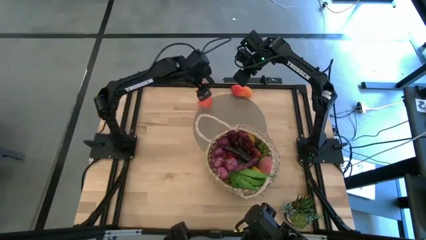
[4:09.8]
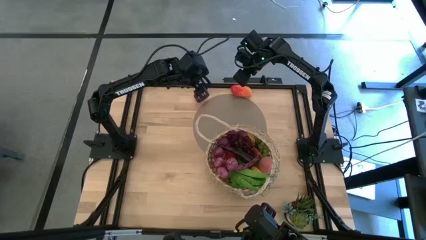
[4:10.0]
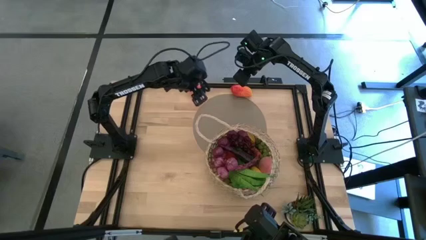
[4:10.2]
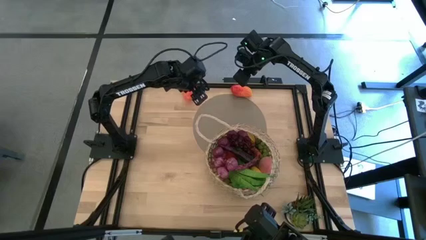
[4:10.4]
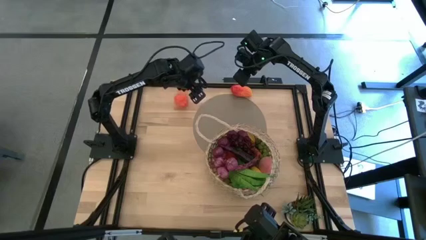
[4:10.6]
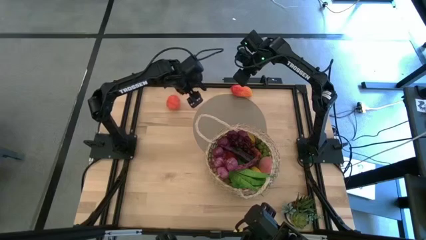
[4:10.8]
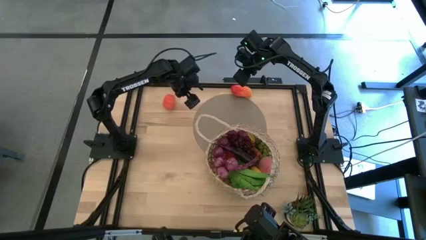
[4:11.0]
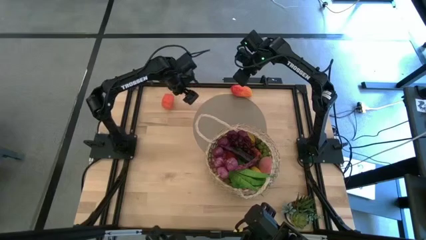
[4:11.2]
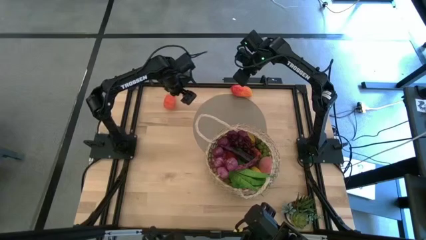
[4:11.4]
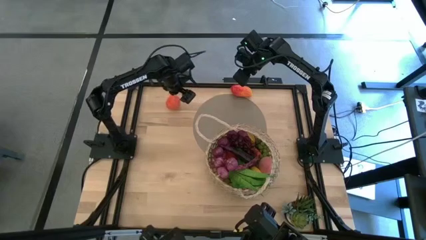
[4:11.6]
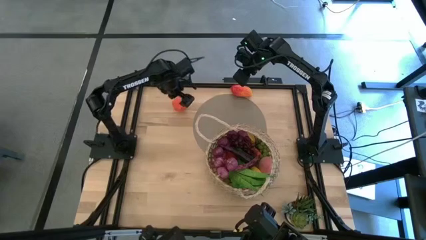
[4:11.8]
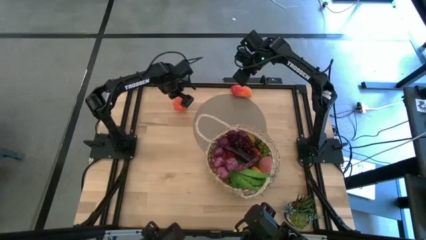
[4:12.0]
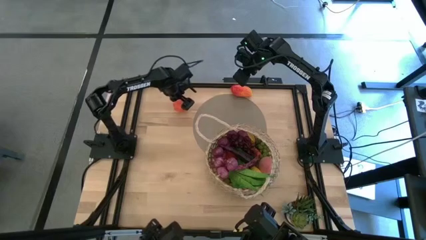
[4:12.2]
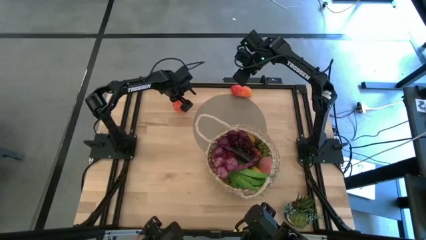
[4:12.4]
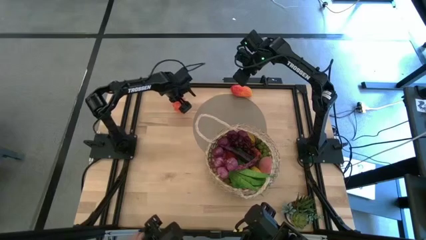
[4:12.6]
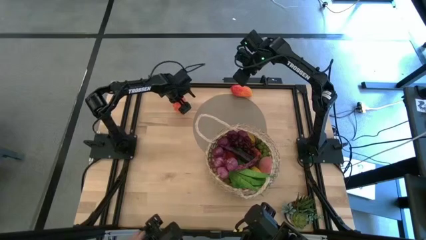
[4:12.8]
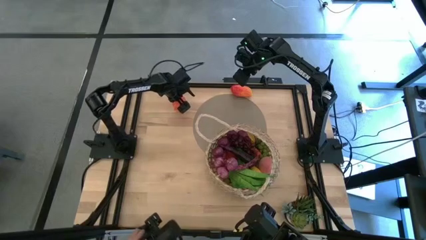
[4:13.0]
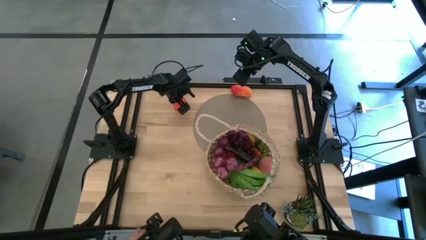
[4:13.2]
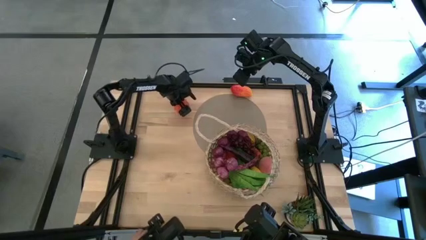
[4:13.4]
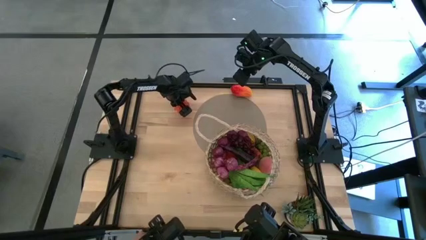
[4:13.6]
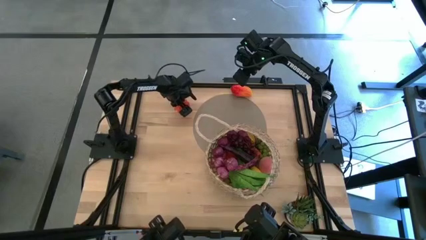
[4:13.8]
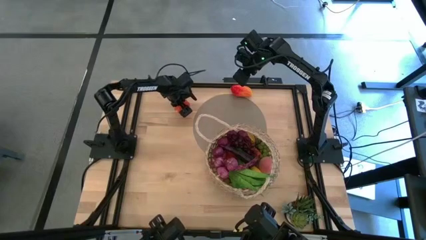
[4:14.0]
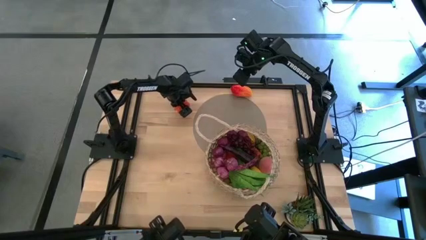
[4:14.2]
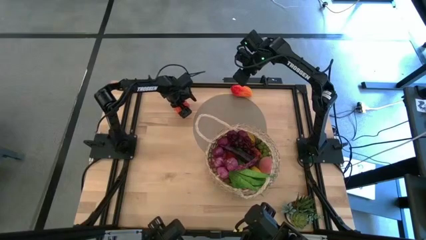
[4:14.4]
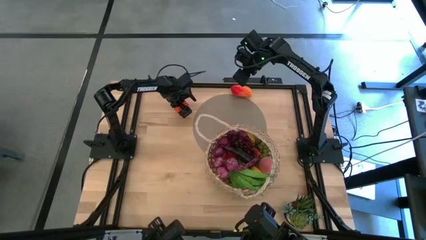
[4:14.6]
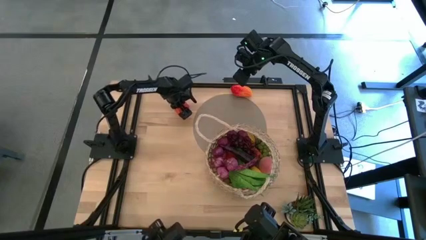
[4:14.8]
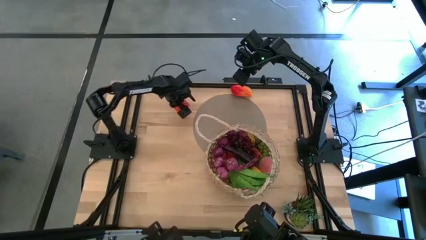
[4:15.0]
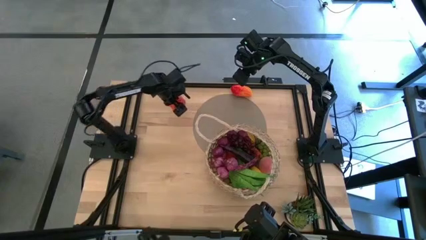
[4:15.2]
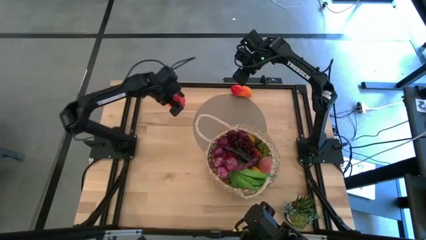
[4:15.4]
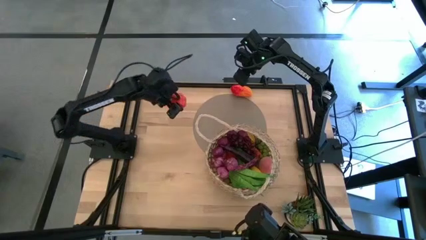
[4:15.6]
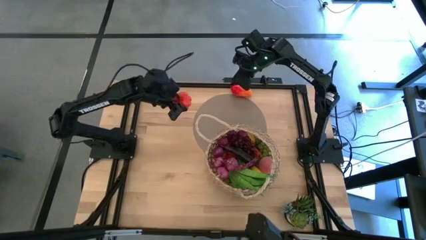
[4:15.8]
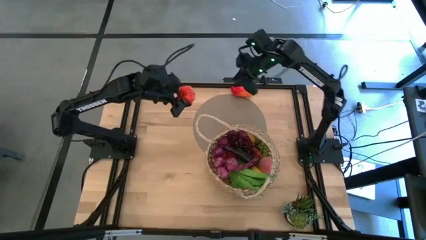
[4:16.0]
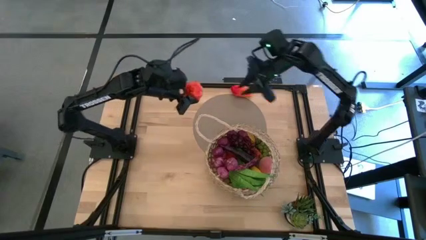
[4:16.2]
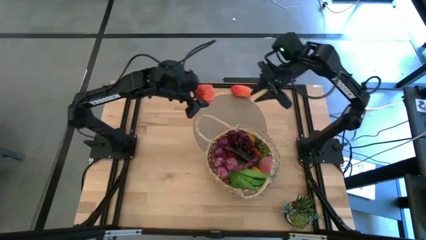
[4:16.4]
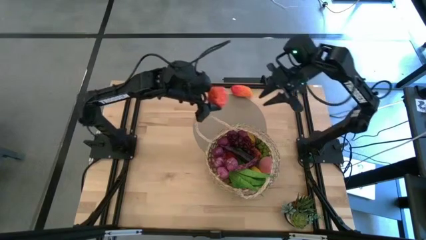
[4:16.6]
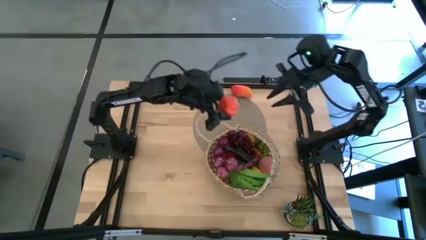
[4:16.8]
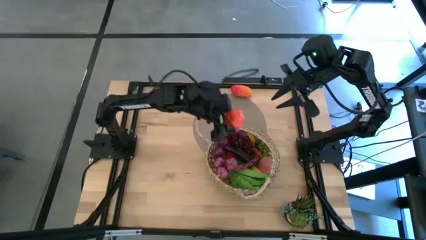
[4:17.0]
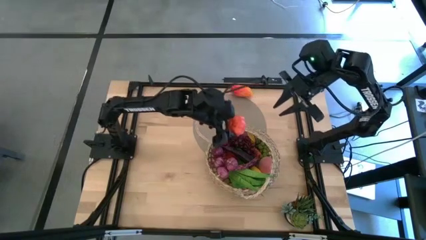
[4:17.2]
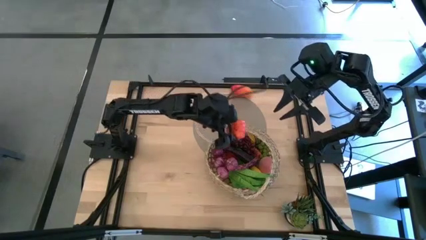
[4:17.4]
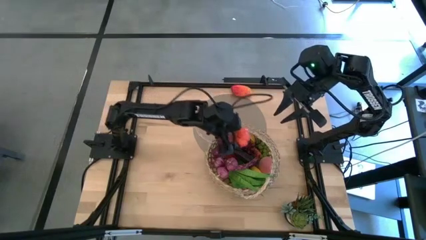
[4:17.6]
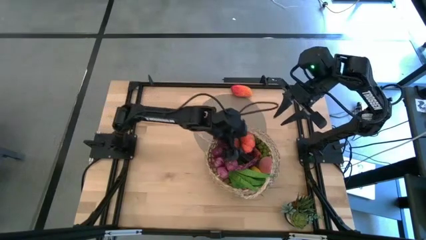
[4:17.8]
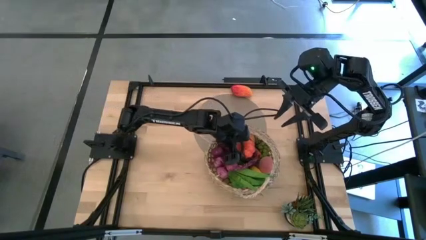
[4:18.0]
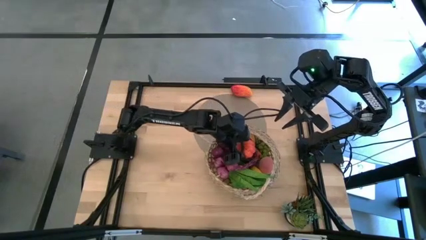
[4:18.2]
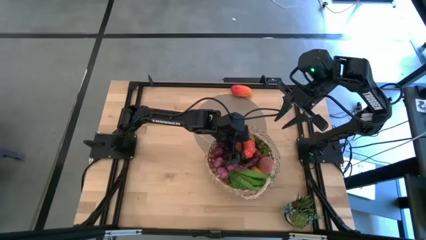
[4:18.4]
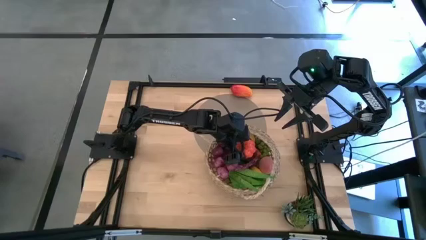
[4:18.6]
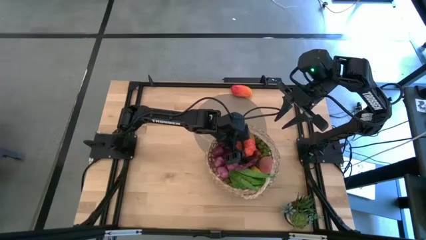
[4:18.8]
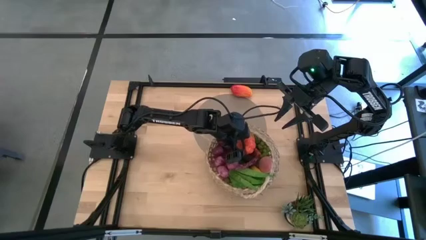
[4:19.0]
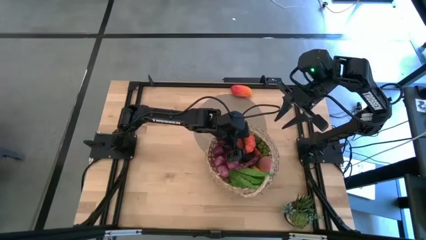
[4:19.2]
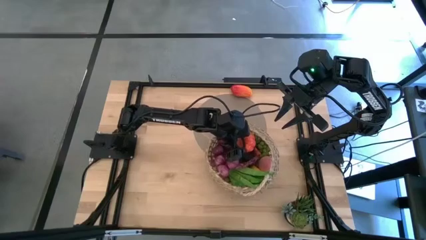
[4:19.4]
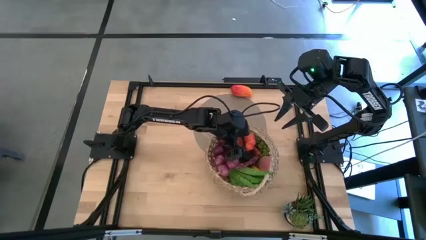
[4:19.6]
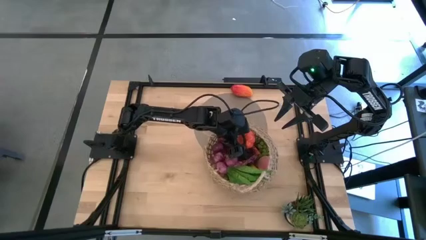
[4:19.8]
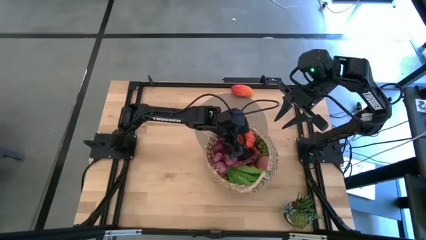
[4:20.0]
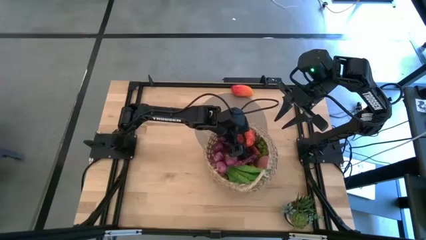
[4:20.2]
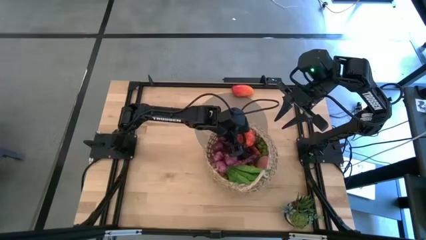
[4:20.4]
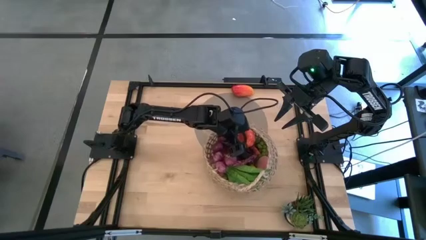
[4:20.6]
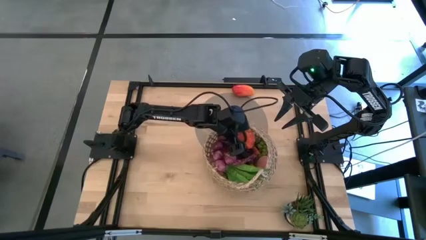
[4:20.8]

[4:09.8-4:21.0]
Task: Build produce basket
Put the orange tangerine into the brown basket
